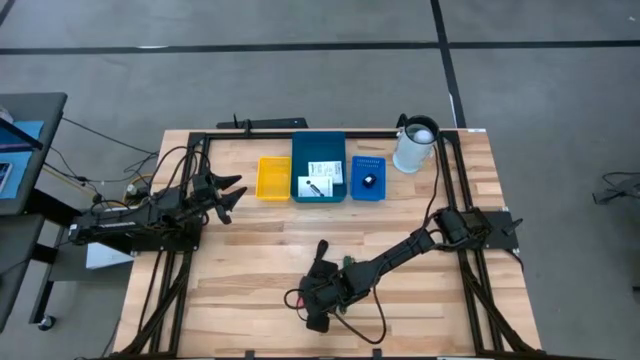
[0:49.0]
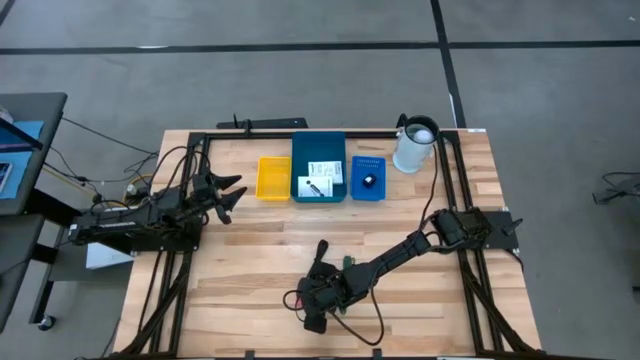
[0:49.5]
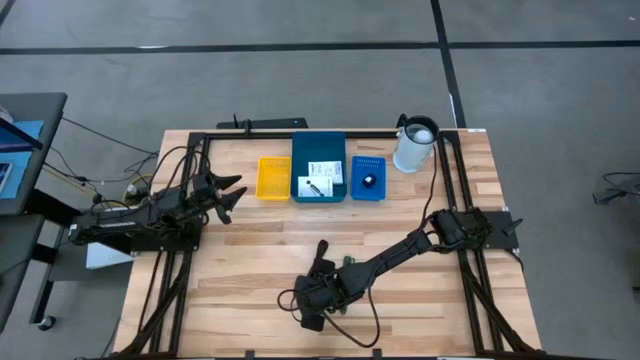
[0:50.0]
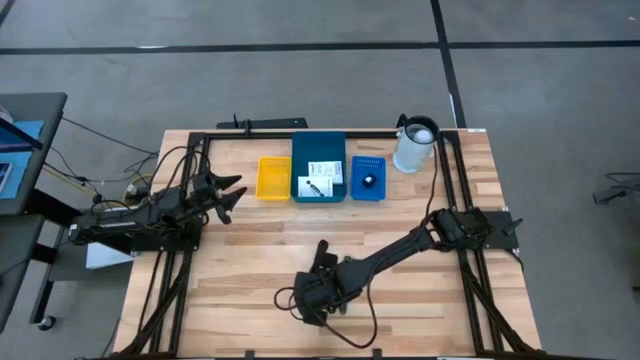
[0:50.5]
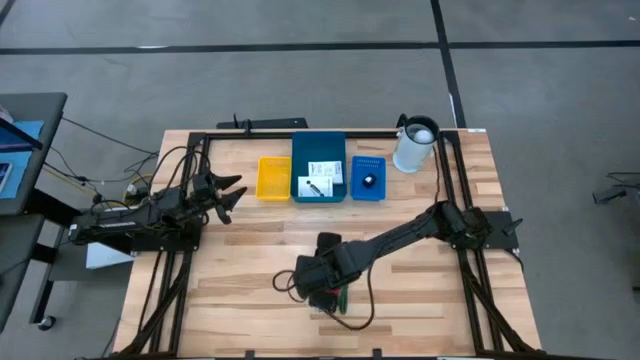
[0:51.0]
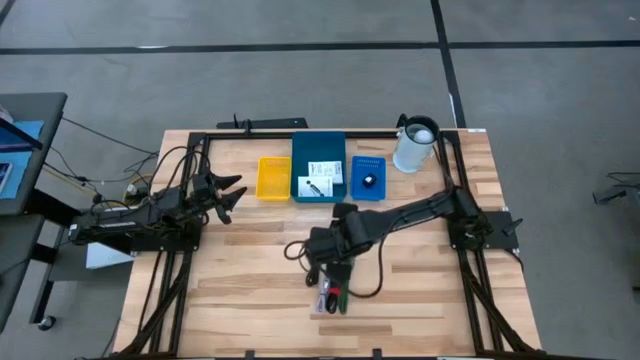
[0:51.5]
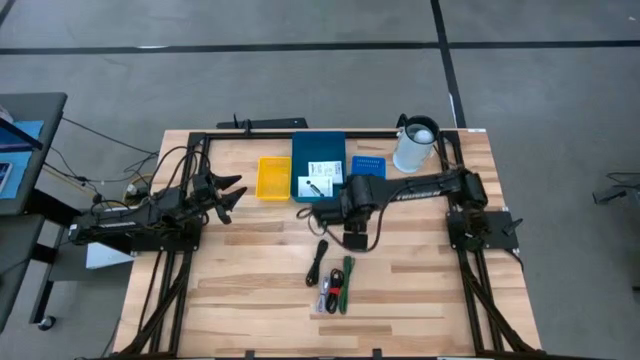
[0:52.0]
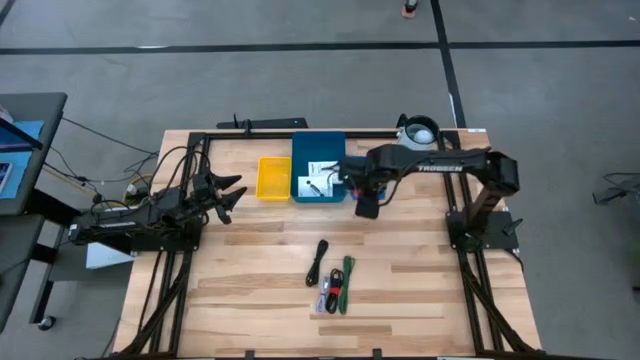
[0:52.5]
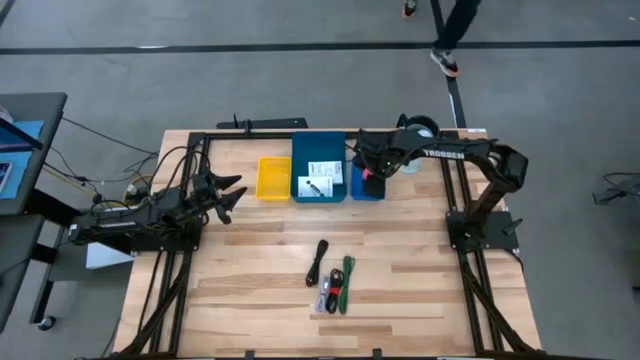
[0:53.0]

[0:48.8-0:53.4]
Task: Pick and place items into bin
Put the pink charger adapter into the blue bin

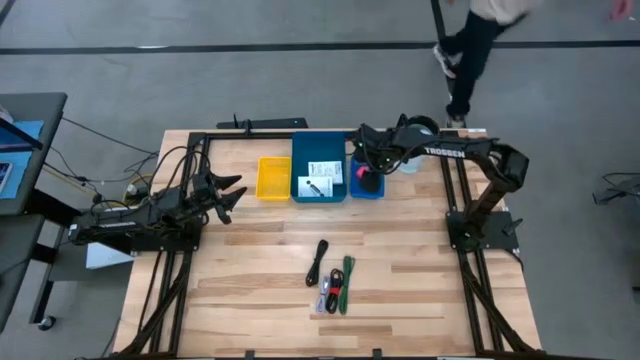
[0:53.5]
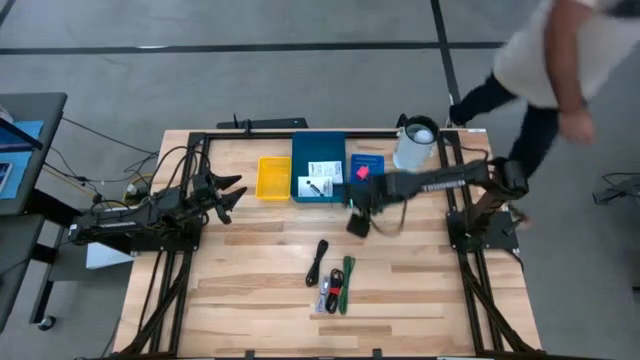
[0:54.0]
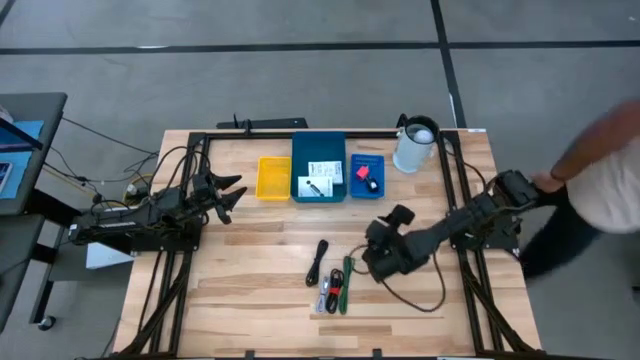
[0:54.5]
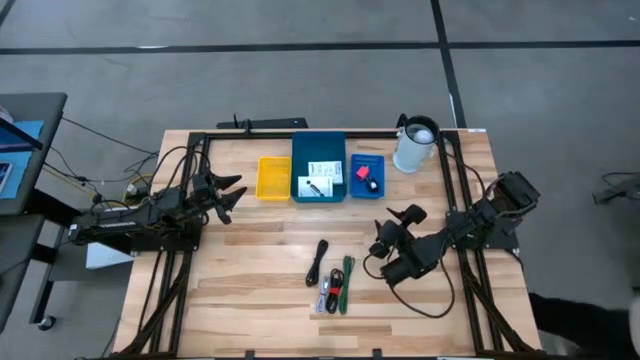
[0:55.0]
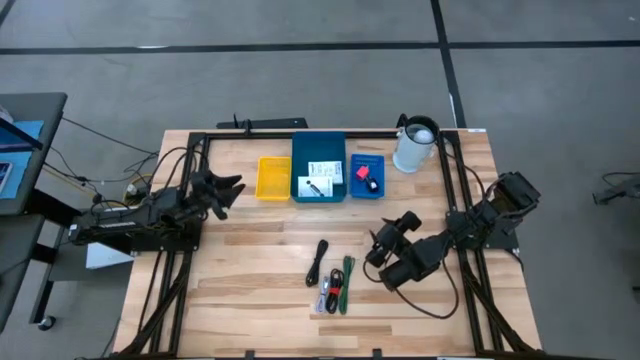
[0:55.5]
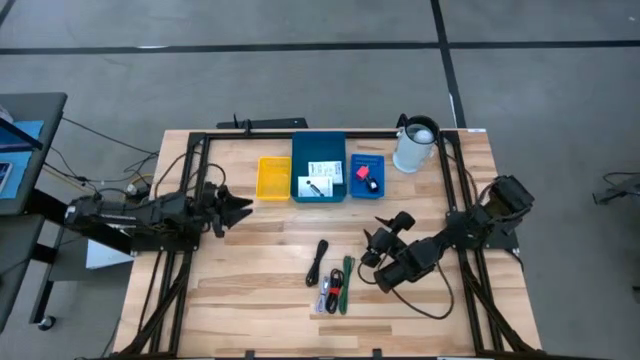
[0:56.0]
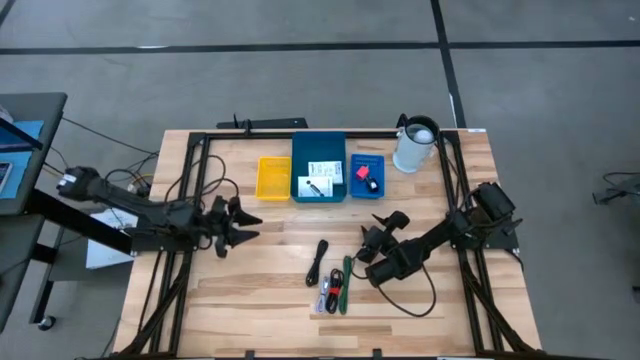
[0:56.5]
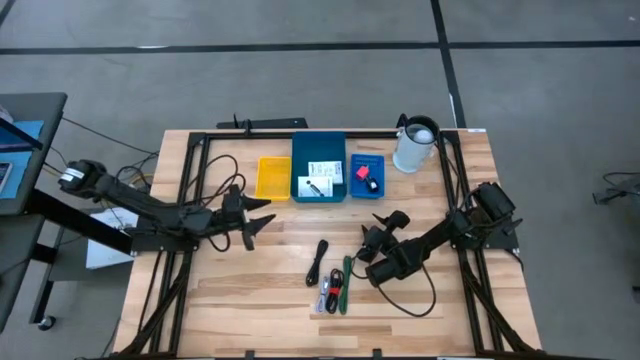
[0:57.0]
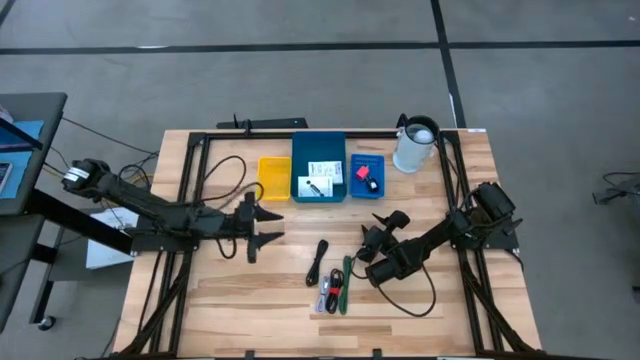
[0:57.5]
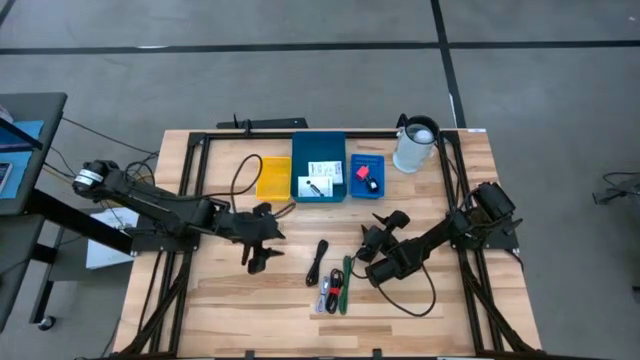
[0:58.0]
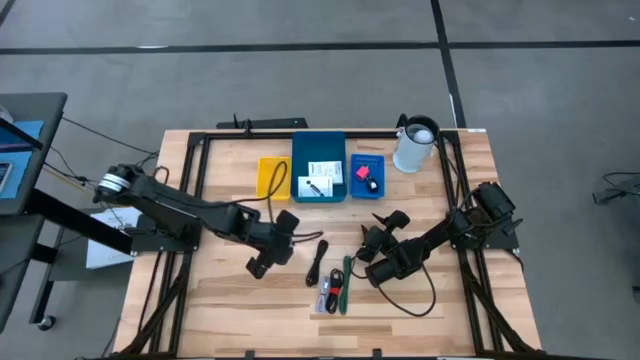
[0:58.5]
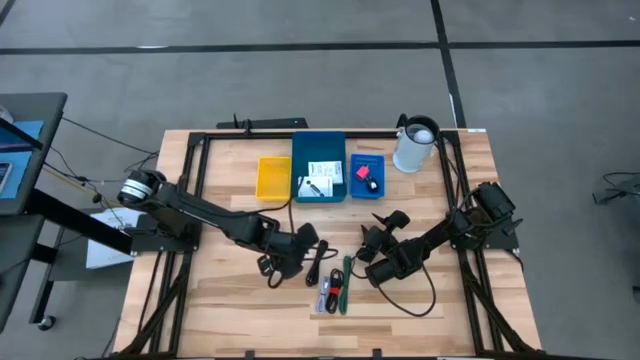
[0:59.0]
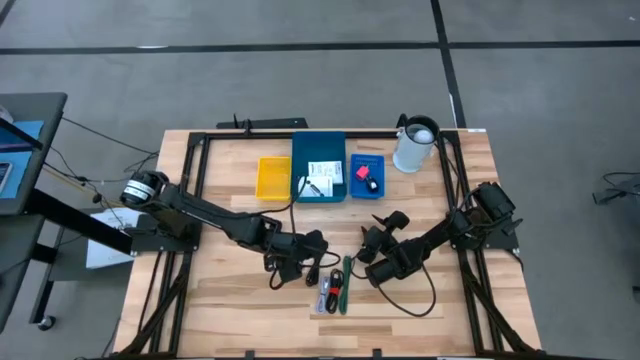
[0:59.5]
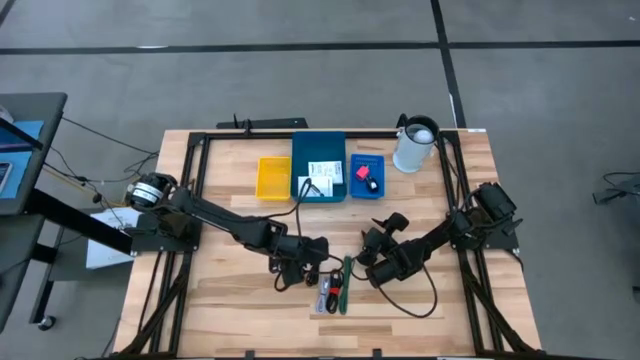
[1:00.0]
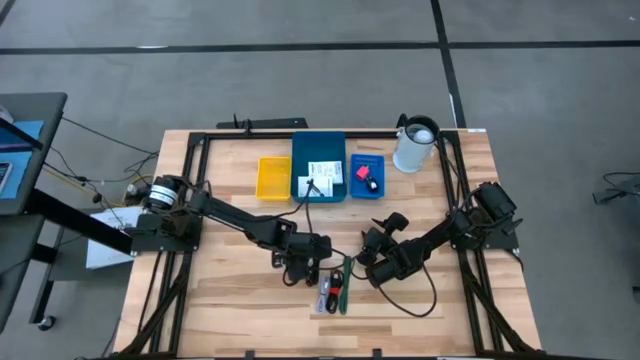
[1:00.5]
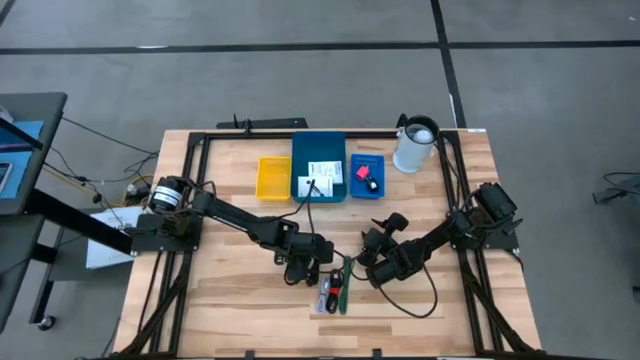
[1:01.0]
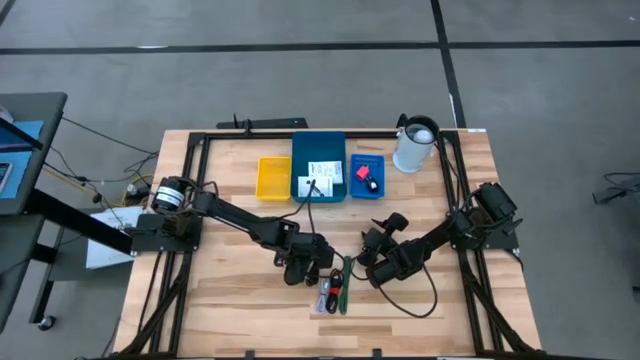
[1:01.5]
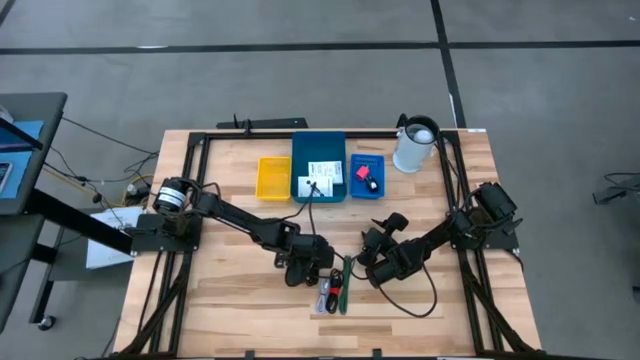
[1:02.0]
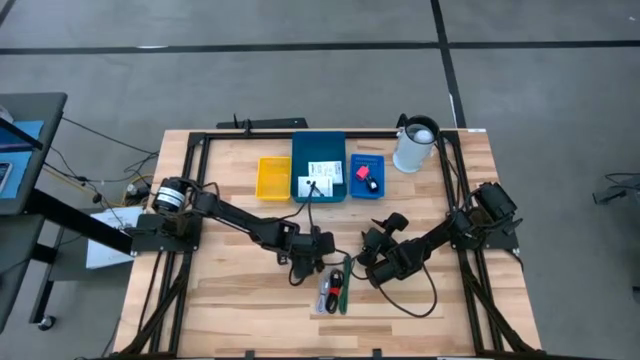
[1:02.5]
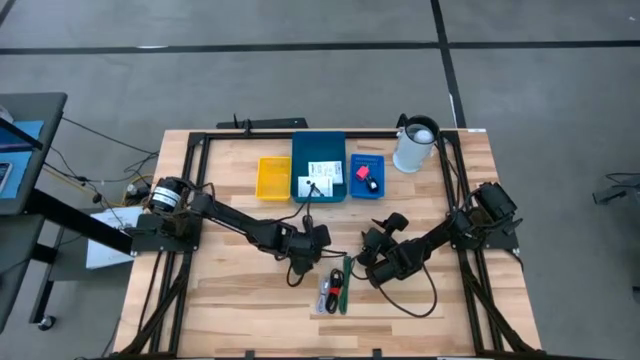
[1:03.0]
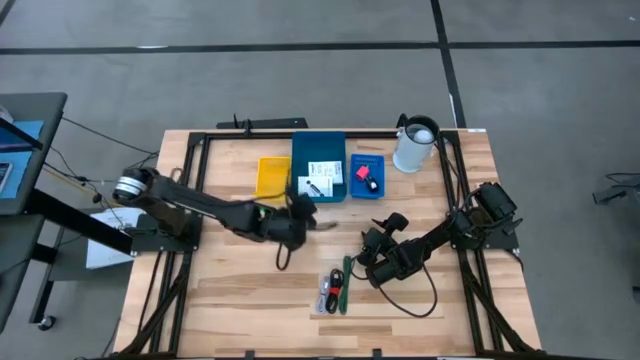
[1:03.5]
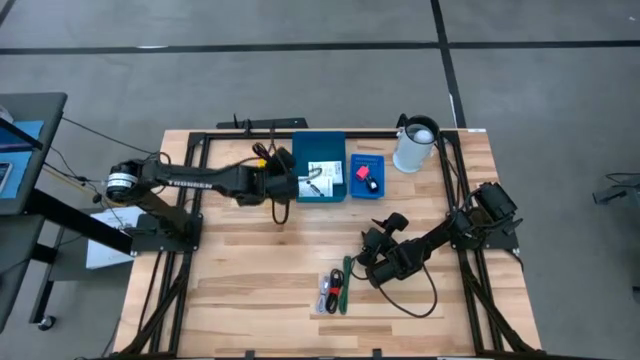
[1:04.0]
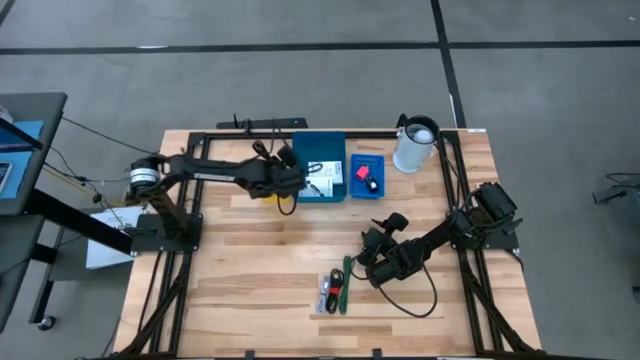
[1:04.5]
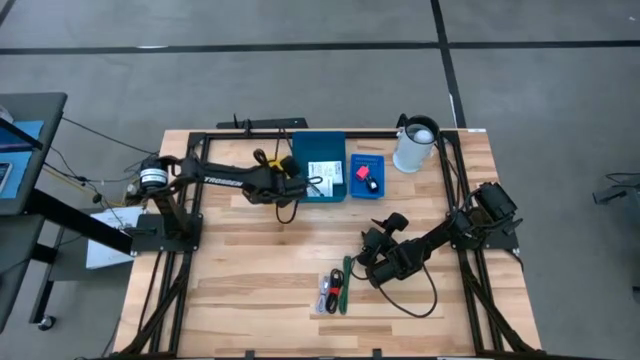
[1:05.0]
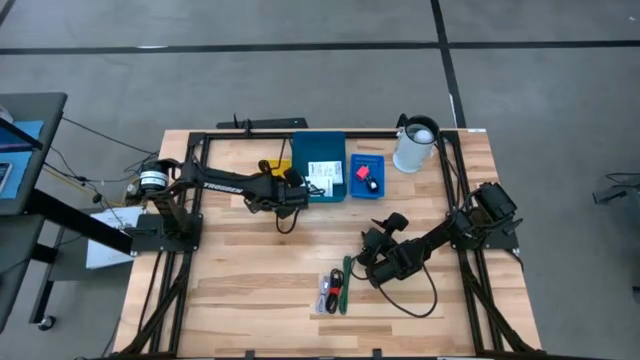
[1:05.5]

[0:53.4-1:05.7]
Put the top black charger cable into the yellow bin

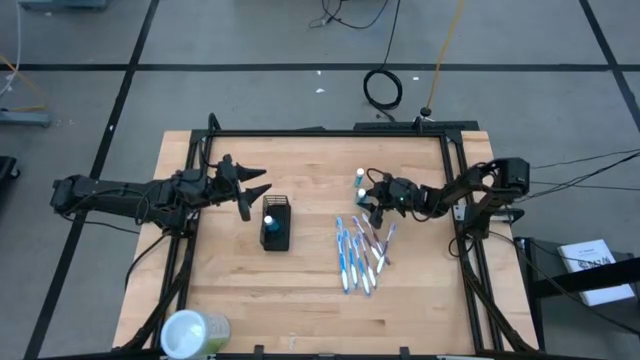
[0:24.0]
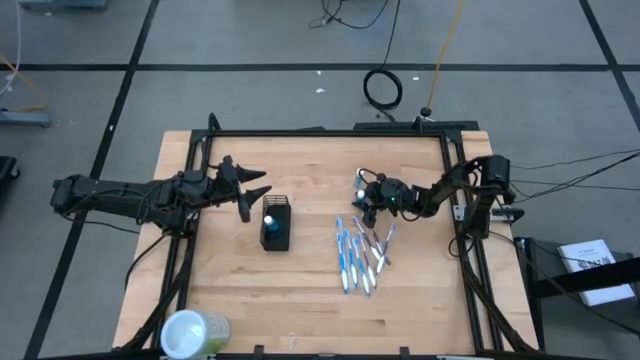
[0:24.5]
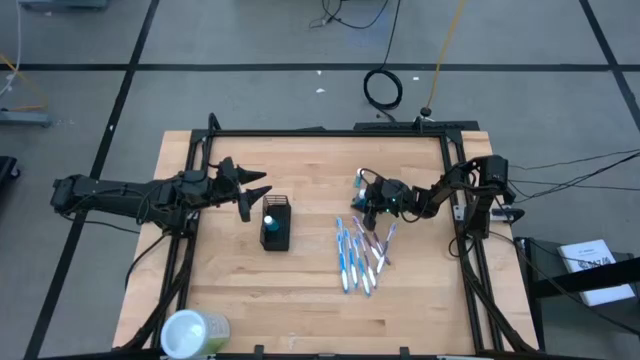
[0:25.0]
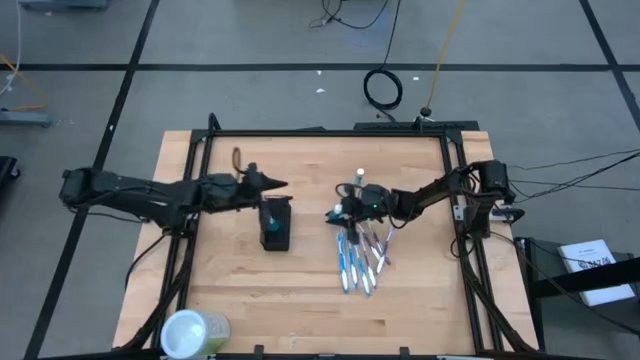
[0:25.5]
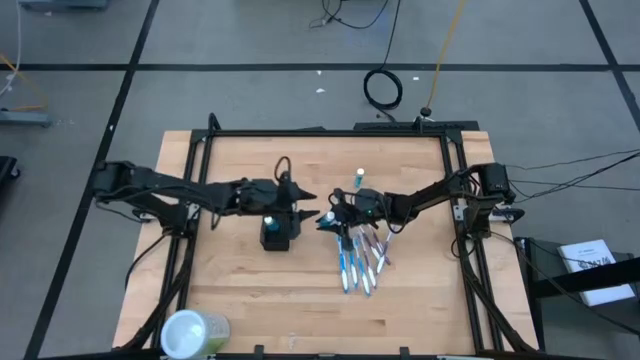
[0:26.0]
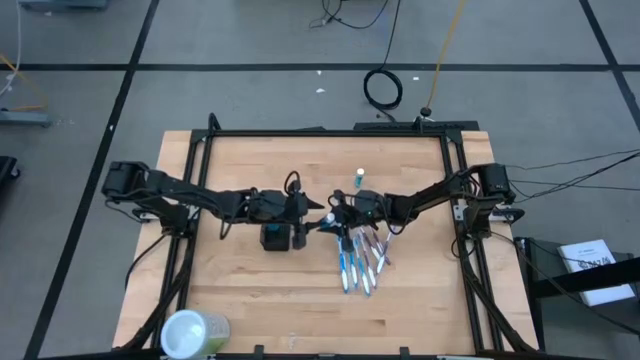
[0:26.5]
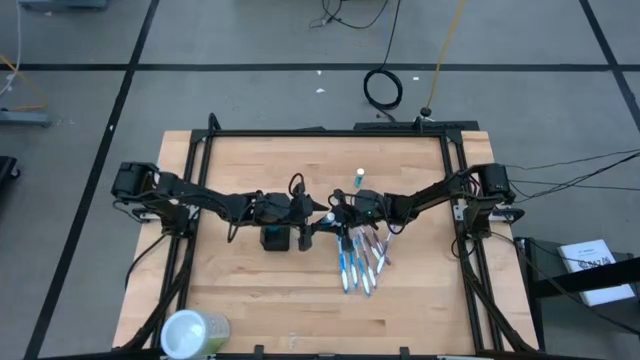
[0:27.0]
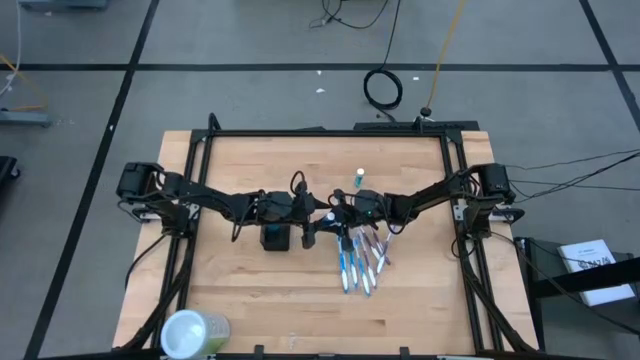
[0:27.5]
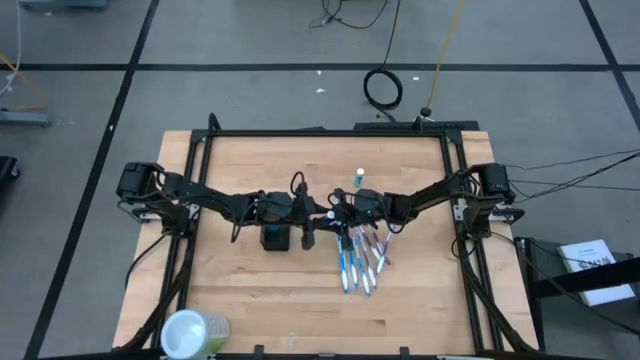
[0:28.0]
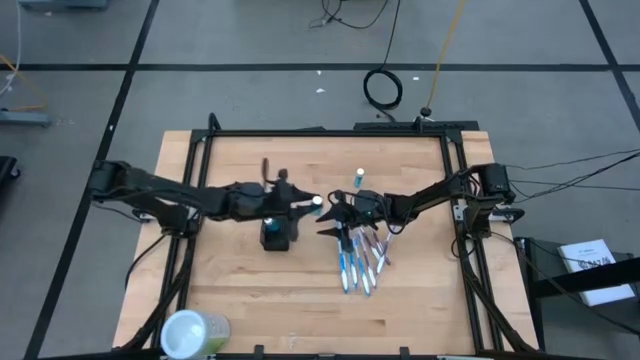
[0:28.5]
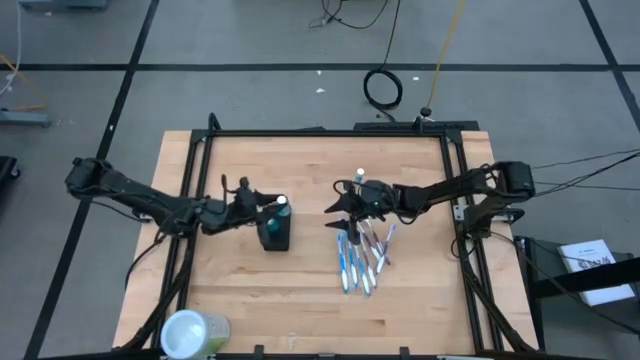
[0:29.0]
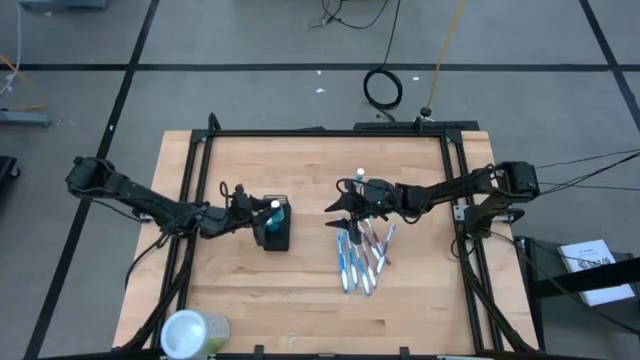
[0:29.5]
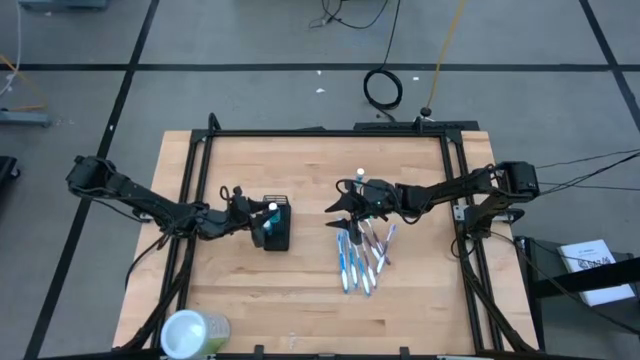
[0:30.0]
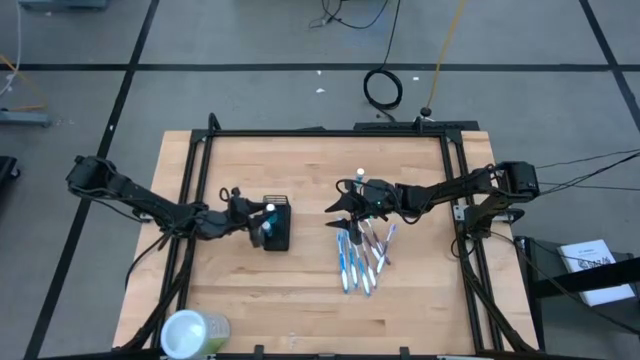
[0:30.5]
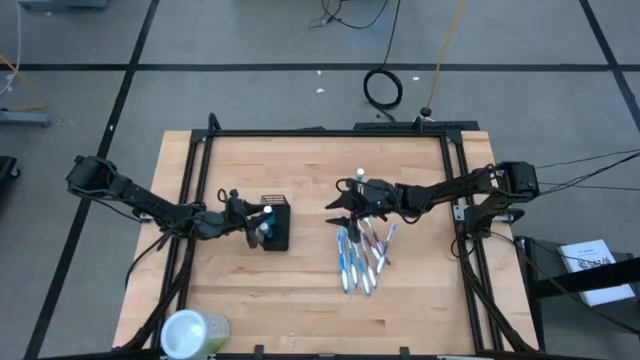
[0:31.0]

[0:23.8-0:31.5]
Task: Pick & Place toothbrushing station
Put the bottom mouthwash into the middle compartment of the mesh organizer
